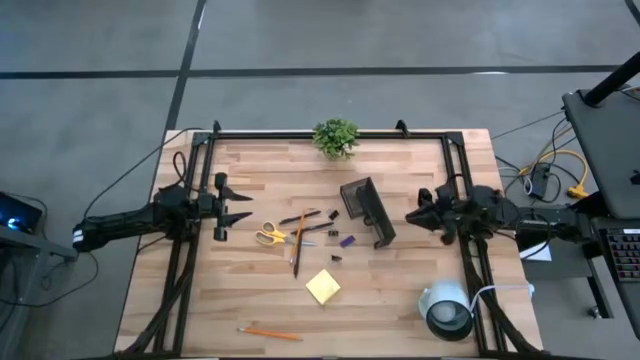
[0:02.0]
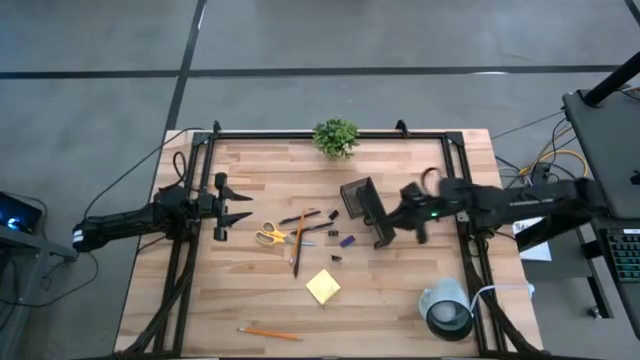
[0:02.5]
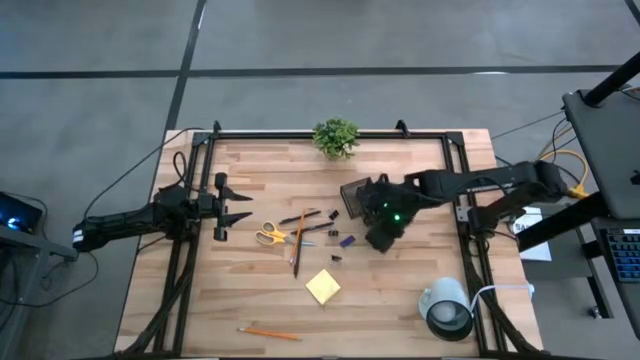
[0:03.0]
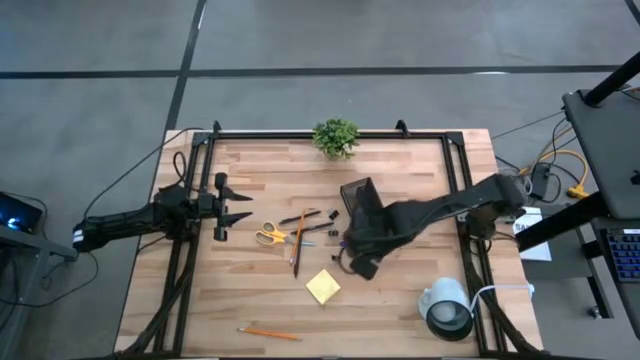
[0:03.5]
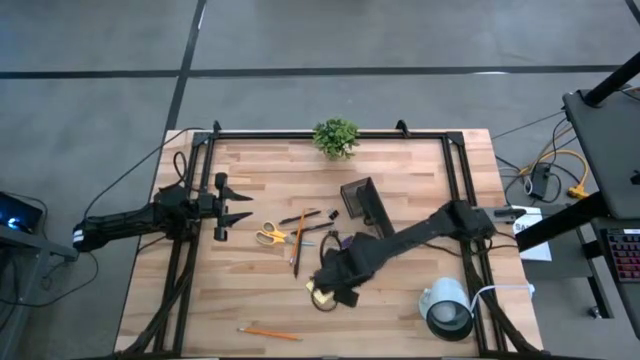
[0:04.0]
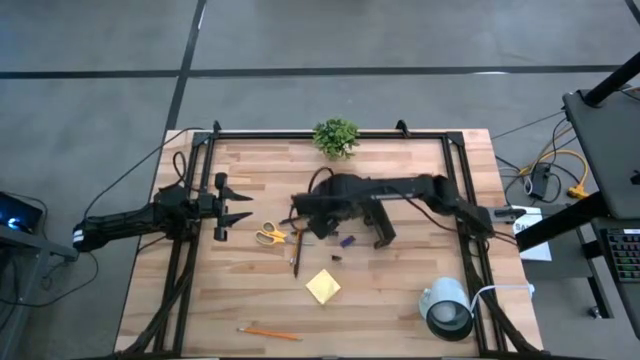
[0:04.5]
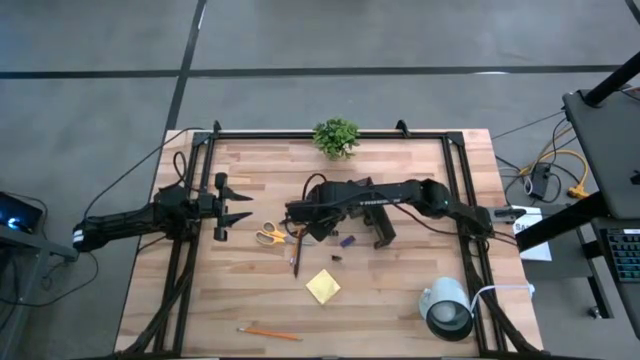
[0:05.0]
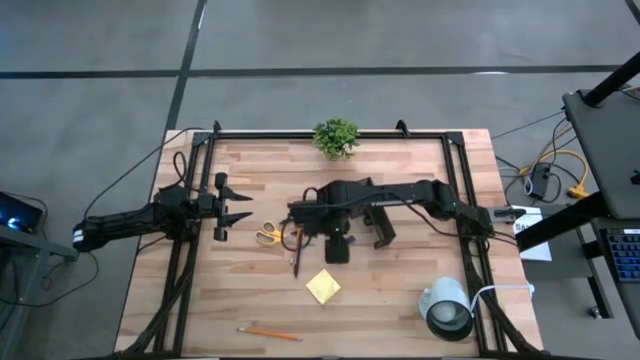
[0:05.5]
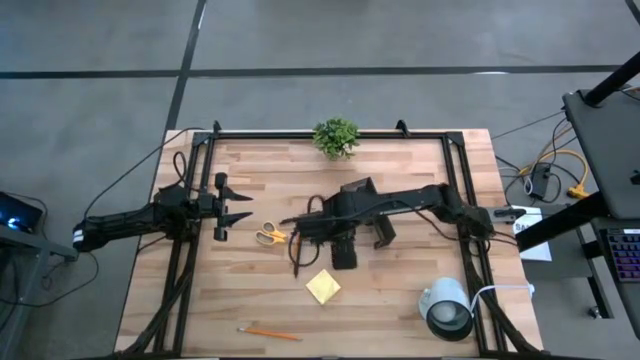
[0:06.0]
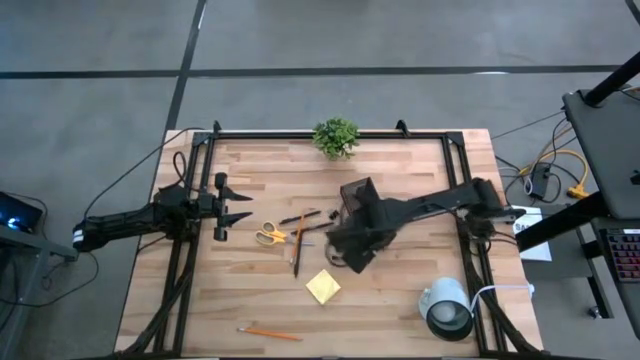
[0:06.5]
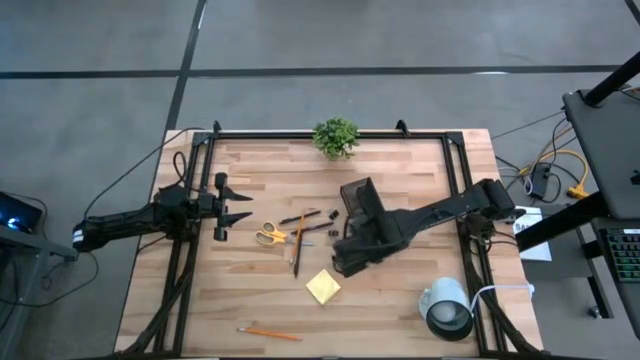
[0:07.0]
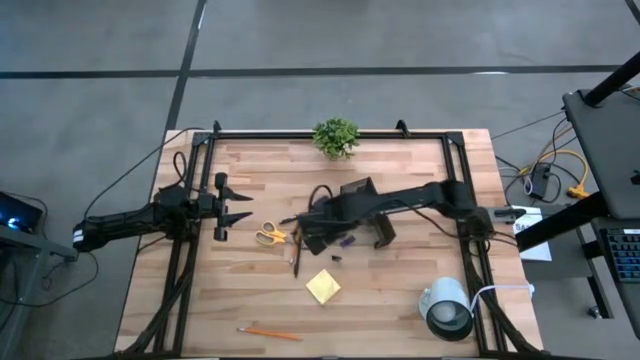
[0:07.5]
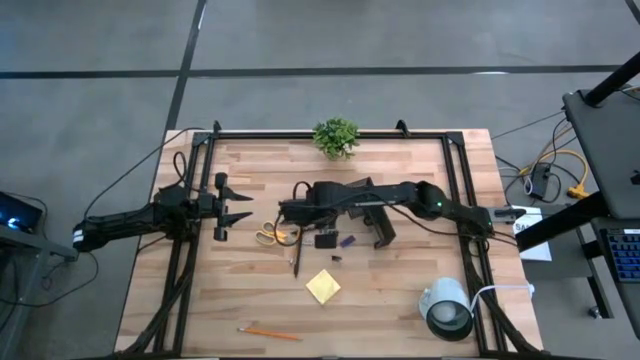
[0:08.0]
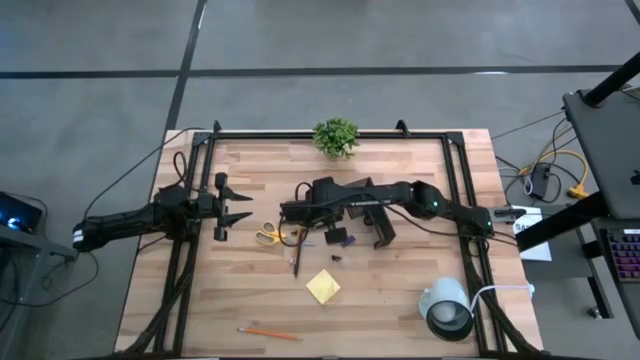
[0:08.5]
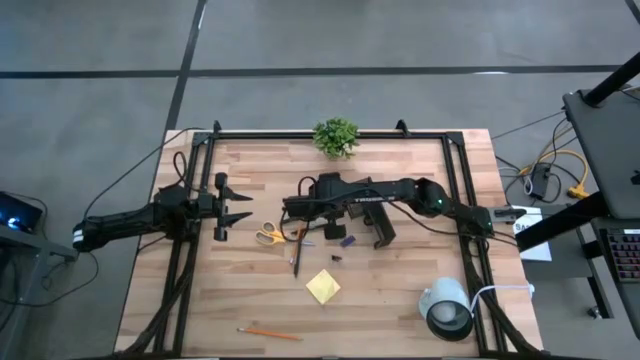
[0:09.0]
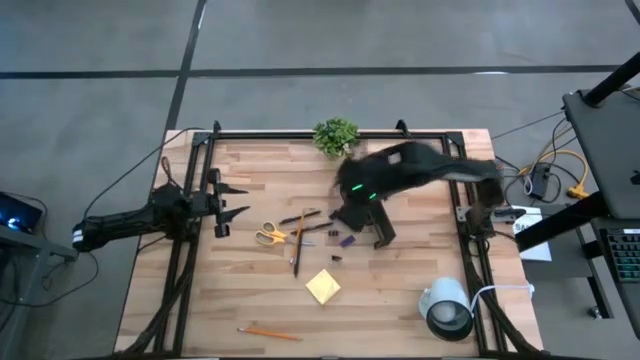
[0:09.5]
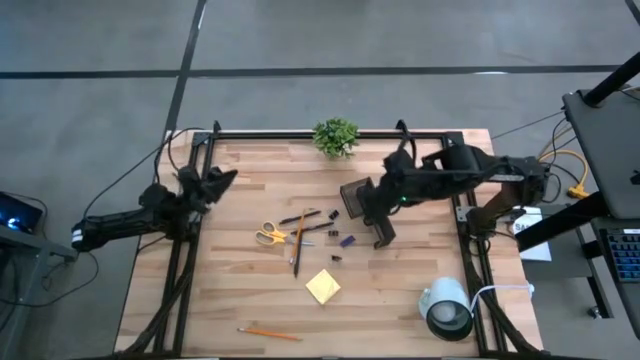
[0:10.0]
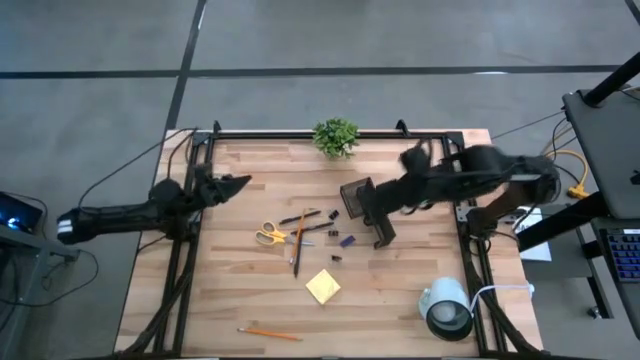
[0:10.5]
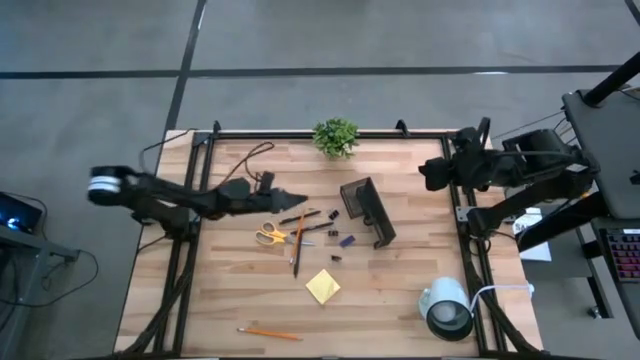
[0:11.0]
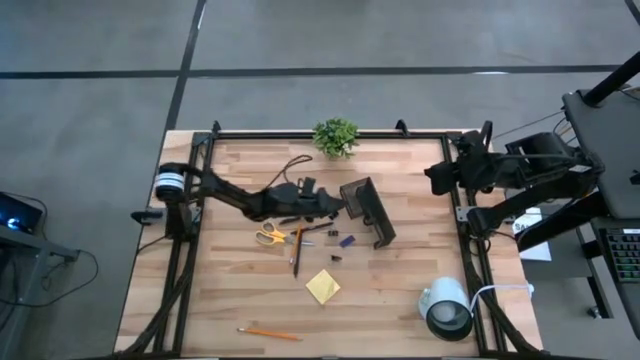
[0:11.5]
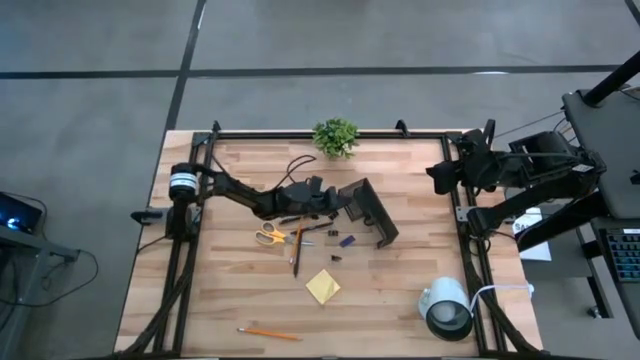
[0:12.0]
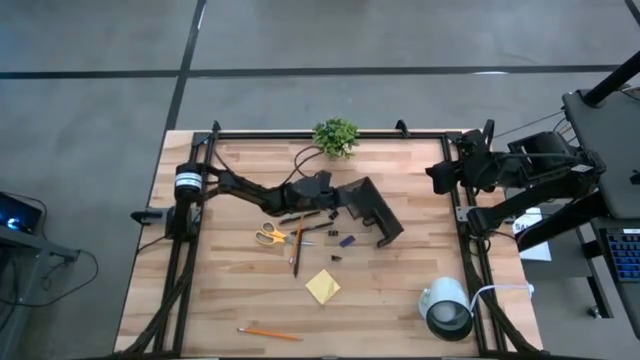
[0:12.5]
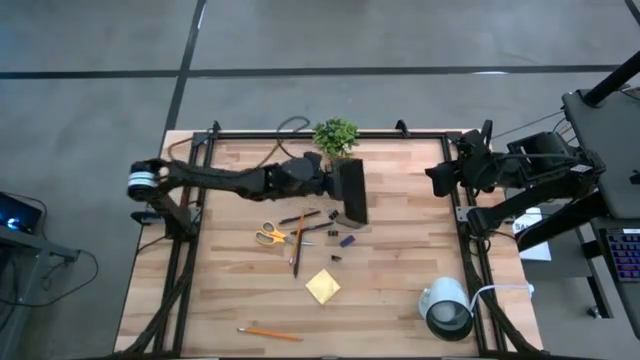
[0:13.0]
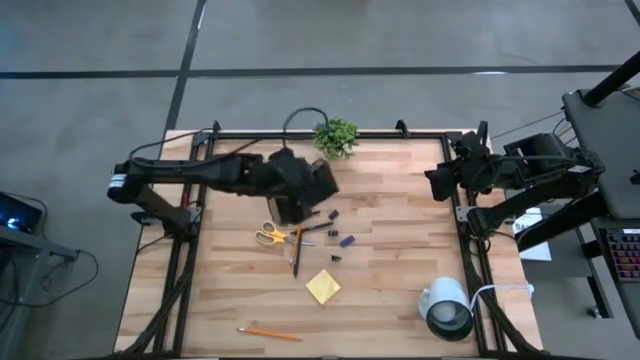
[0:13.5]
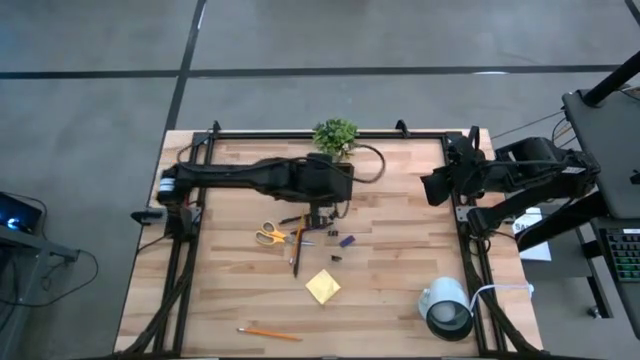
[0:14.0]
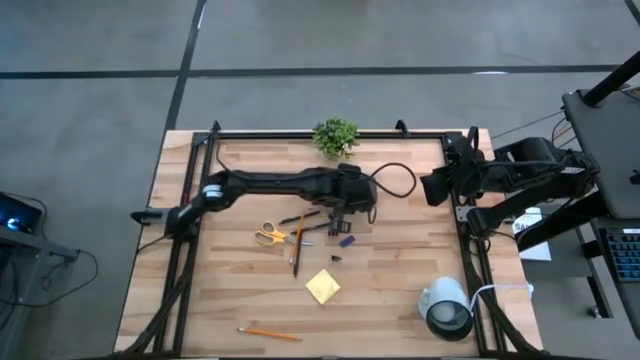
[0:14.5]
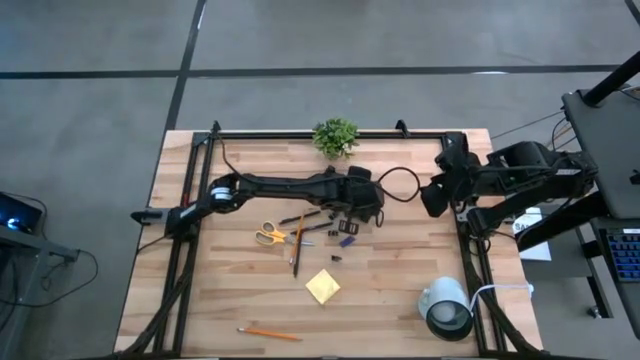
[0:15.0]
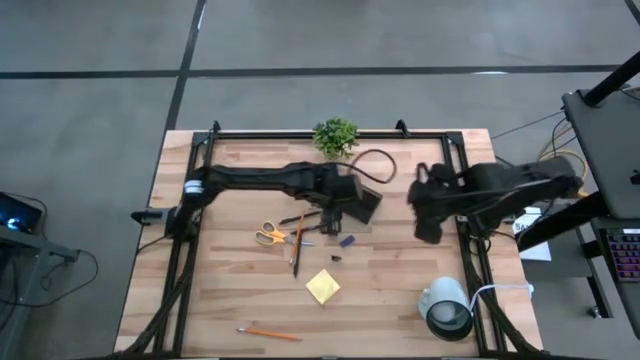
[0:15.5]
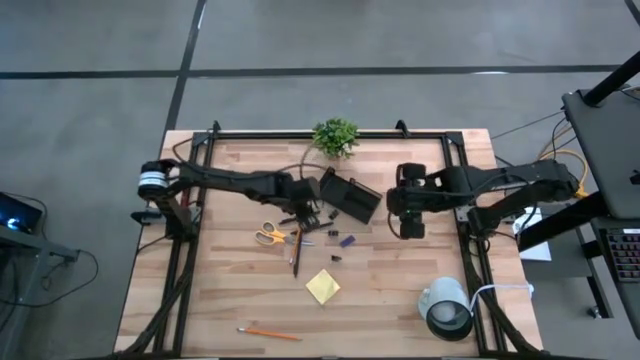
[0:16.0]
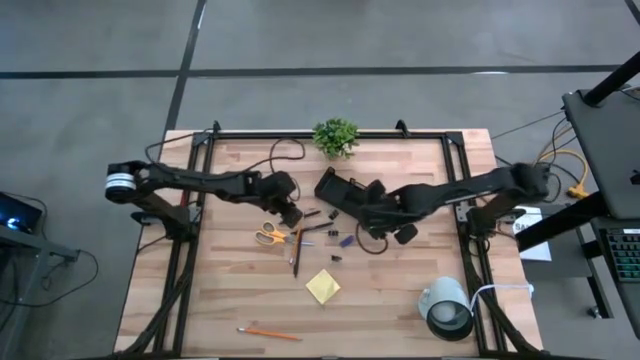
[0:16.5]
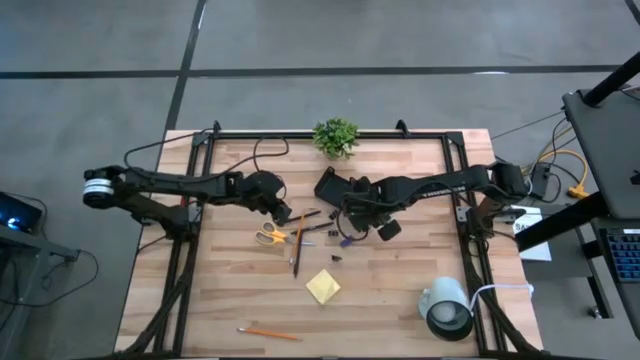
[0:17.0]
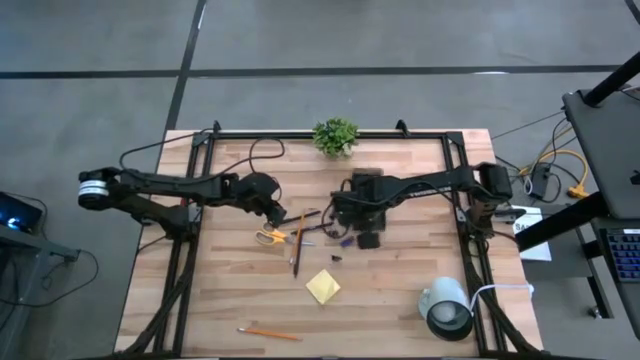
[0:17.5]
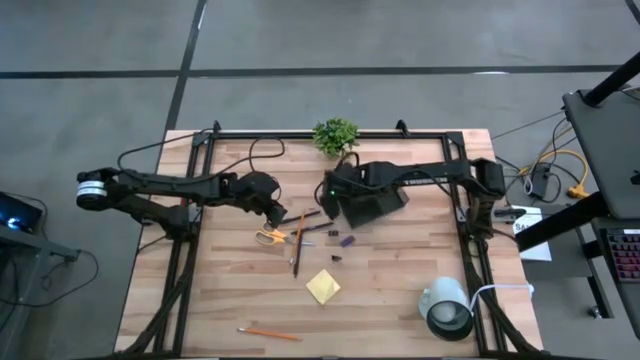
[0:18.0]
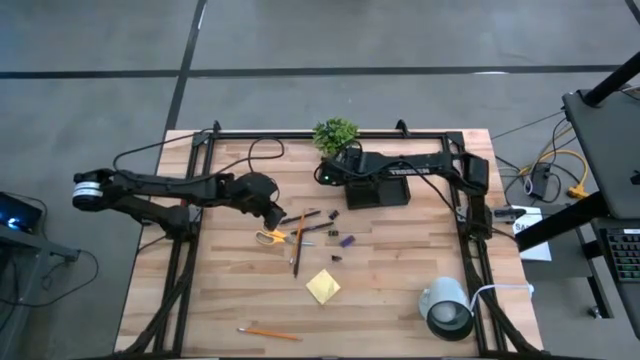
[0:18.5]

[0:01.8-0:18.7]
Task: Pick and place office supplies into organizer
Prepare the desk organizer on the table

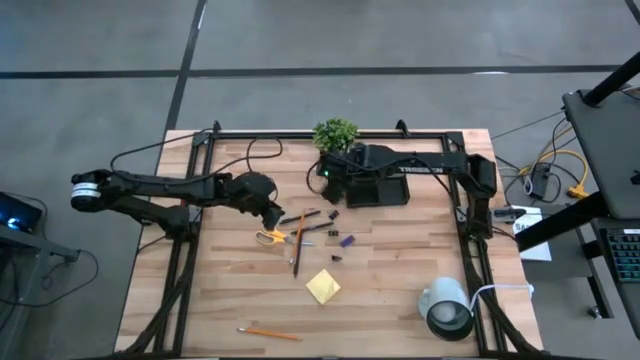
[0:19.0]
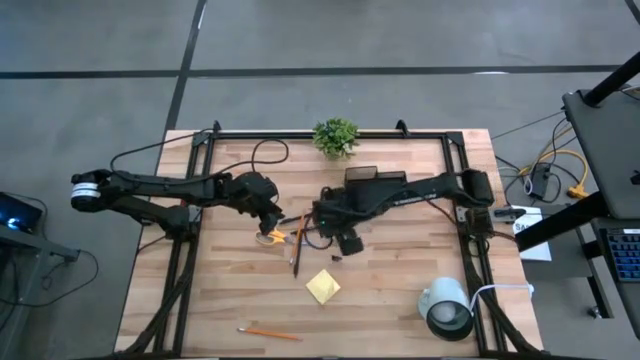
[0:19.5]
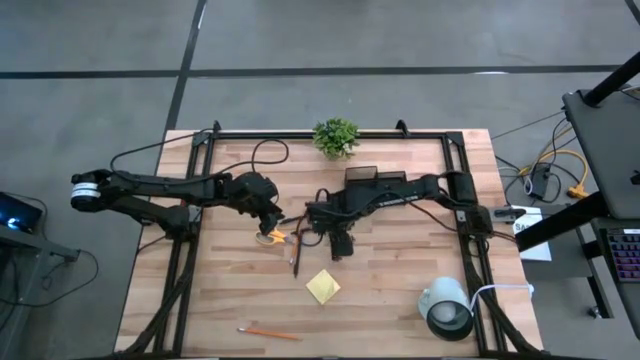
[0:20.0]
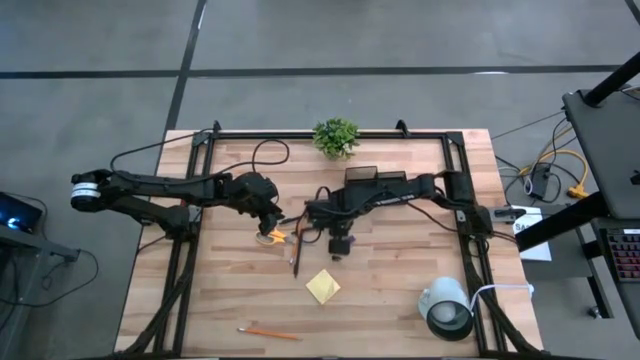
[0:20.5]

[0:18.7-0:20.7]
Put the middle black binder clip into the desk organizer

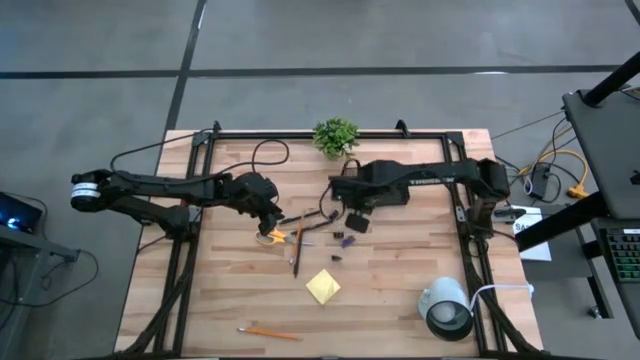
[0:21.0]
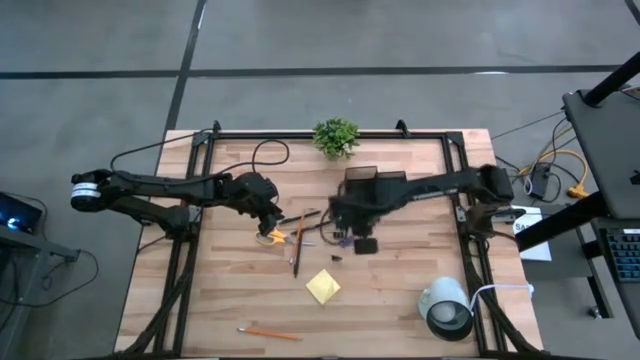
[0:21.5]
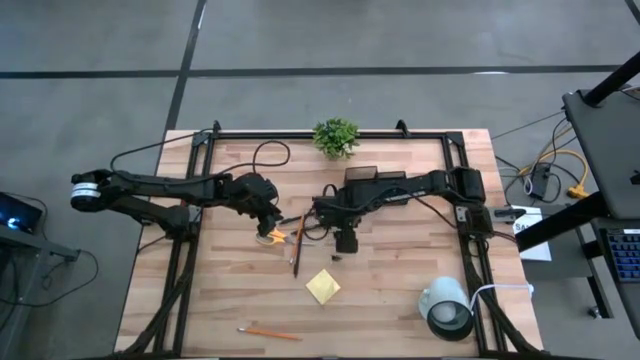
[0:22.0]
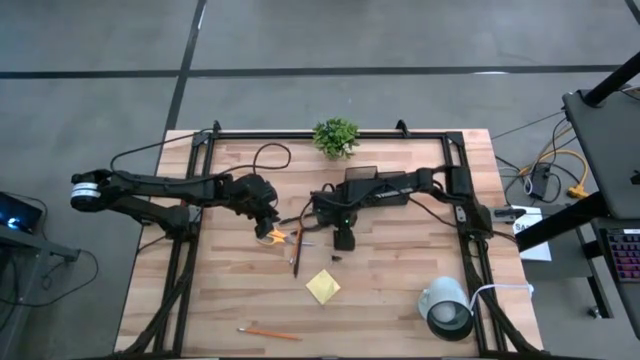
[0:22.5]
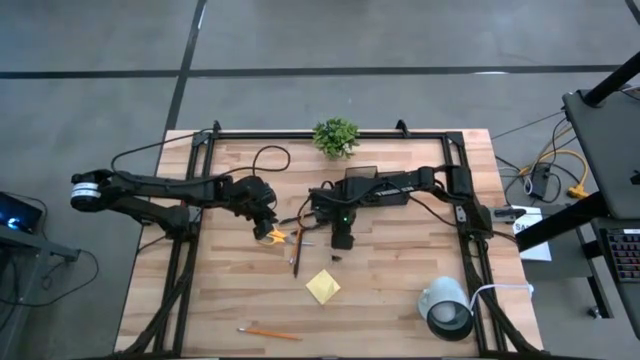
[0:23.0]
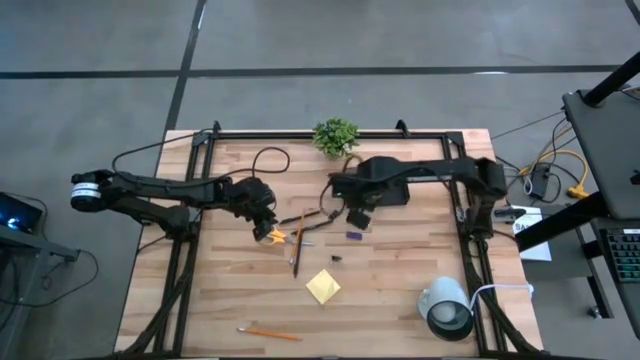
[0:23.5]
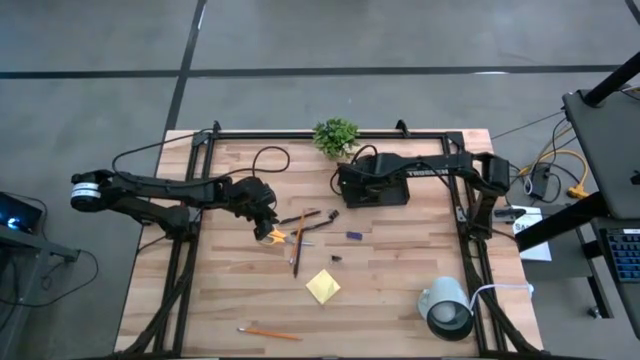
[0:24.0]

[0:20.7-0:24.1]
Put the middle black binder clip into the desk organizer
